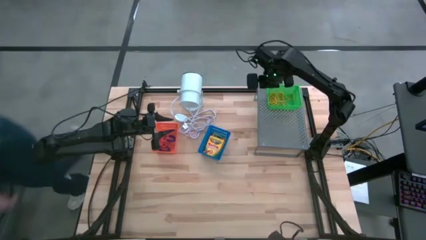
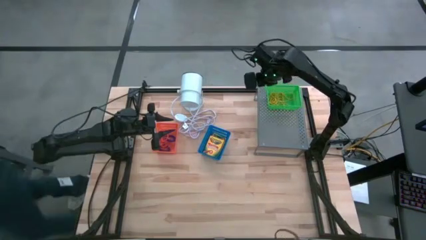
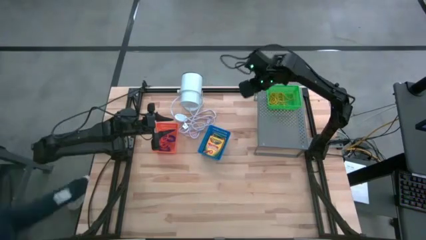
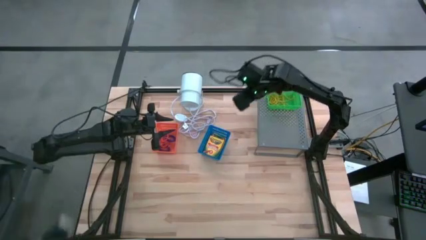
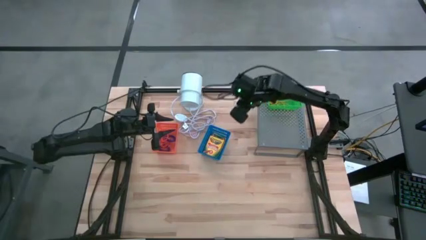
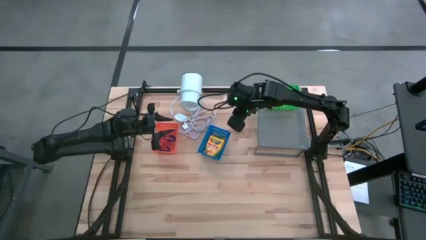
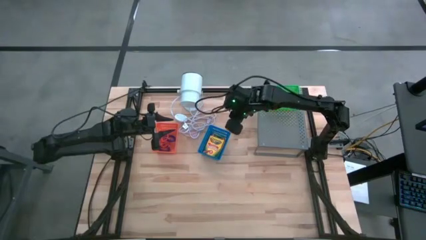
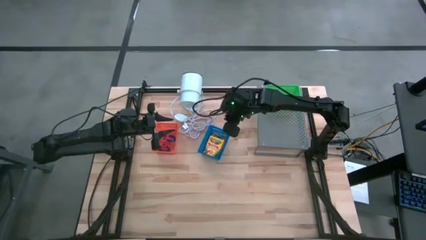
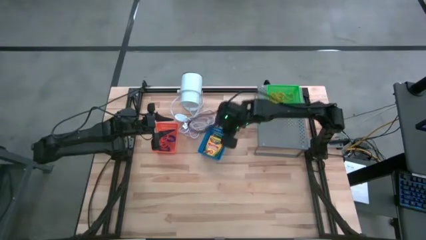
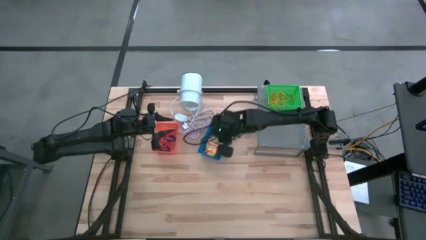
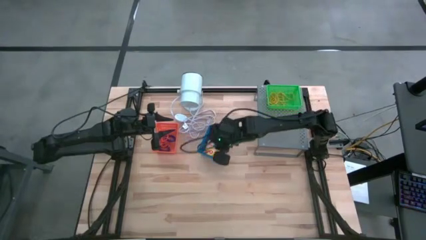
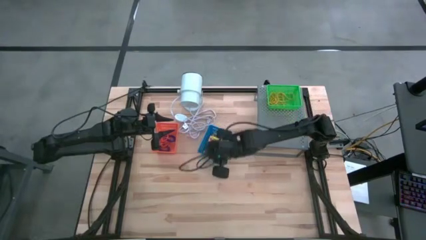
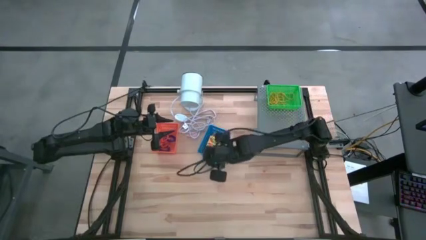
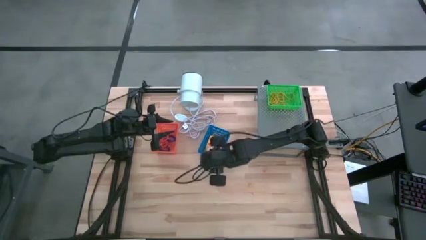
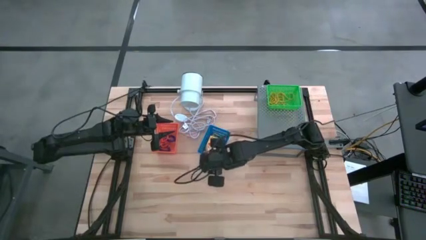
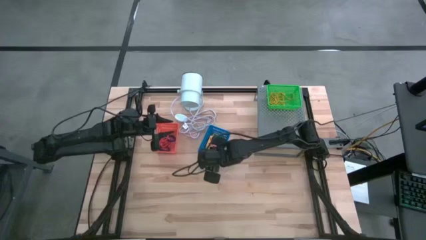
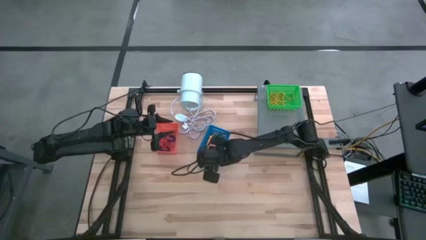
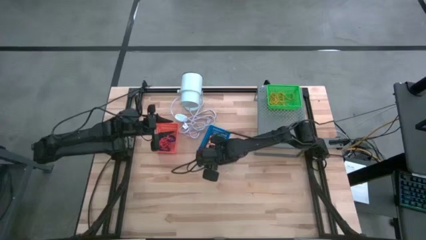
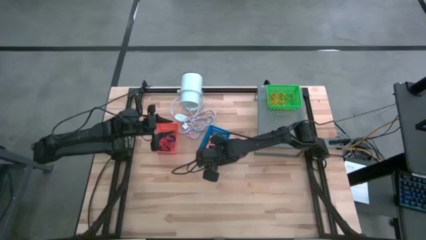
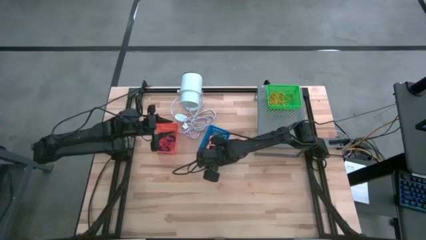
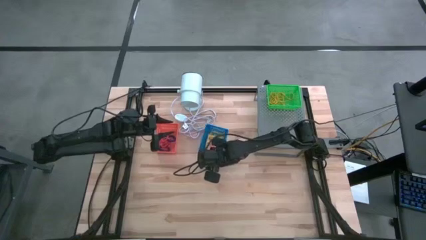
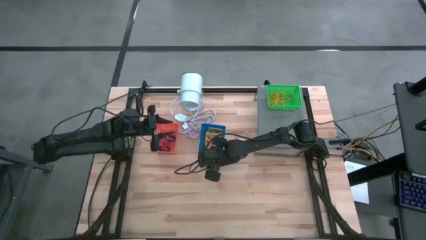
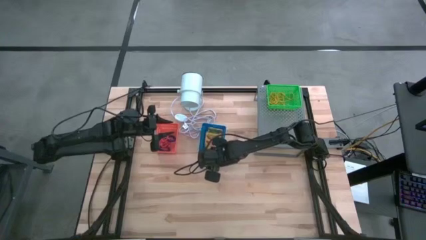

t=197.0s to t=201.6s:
Task: Pick & Place Office Desk Supplies
Put the blue bin filled with pack of crayons on the shelf

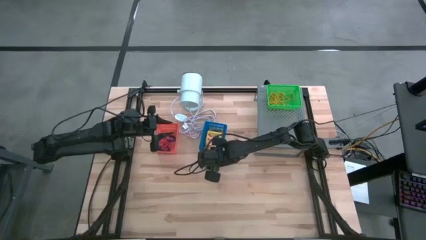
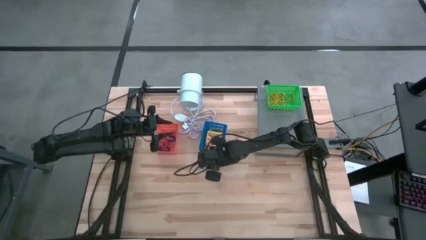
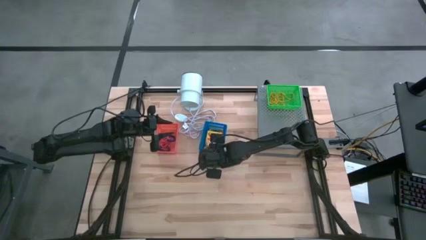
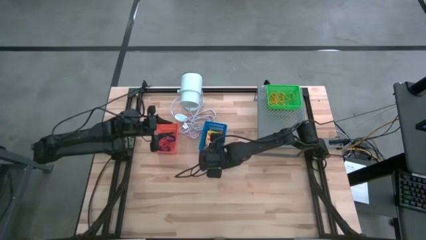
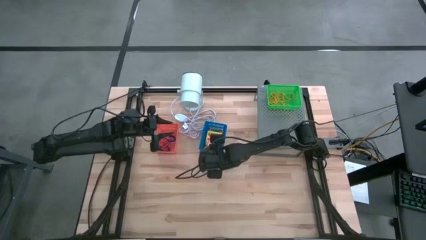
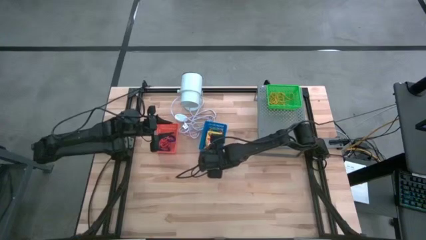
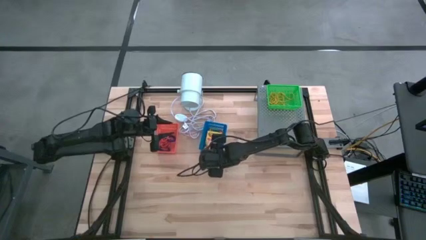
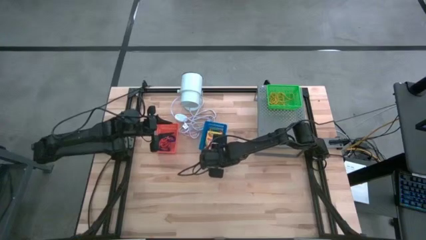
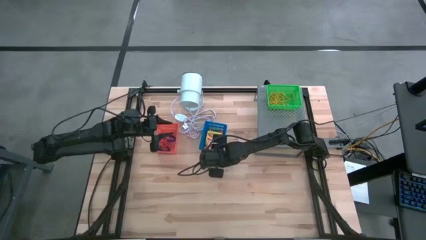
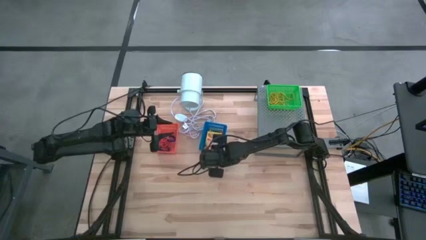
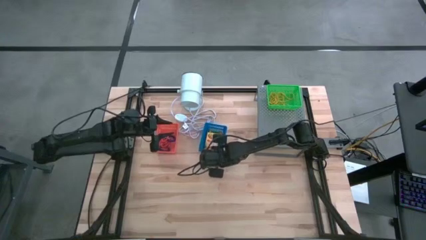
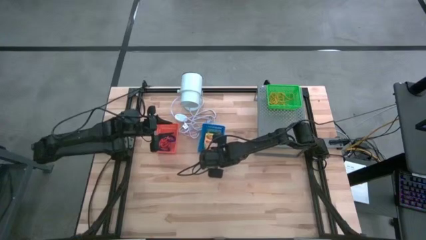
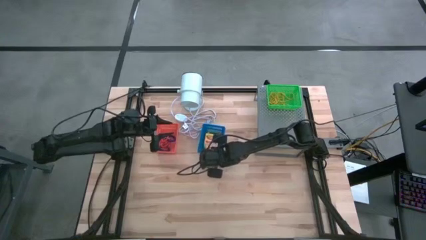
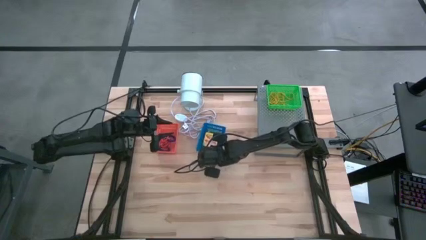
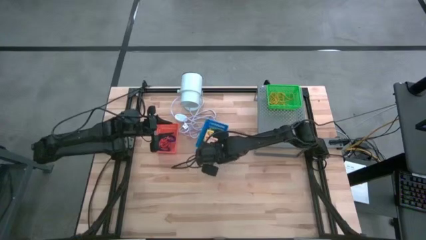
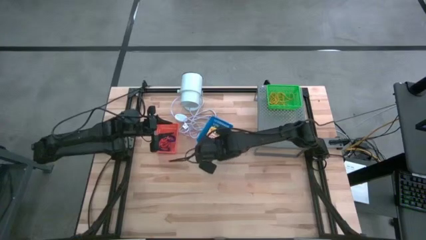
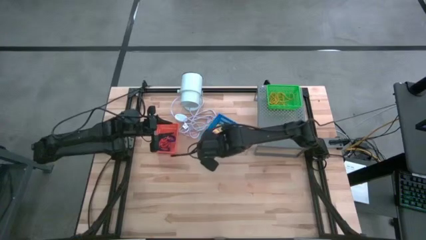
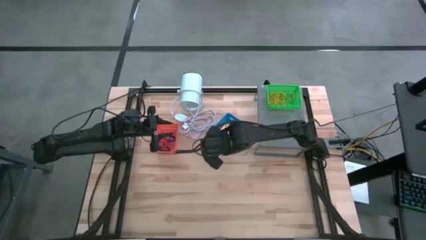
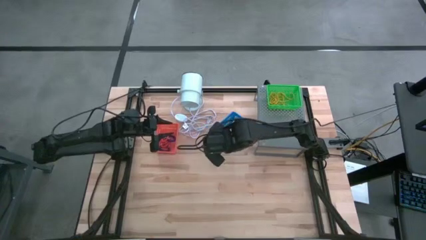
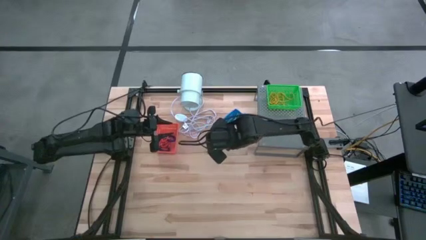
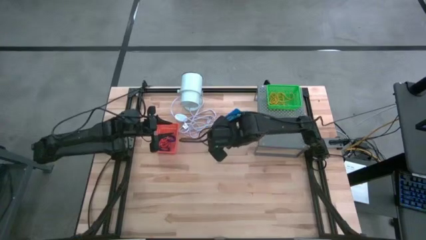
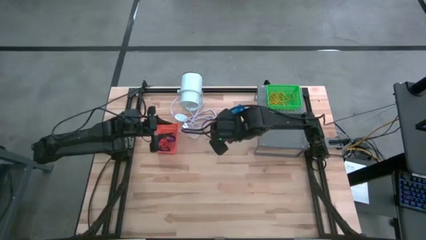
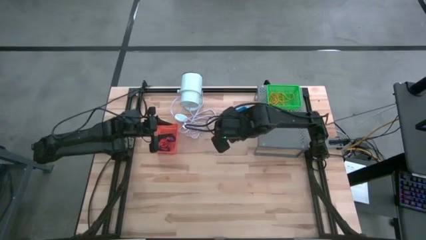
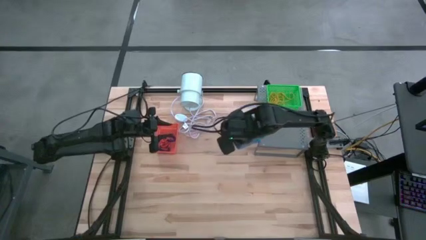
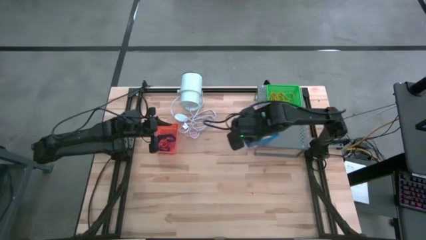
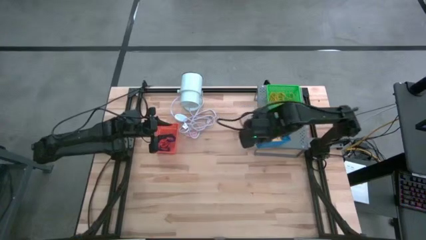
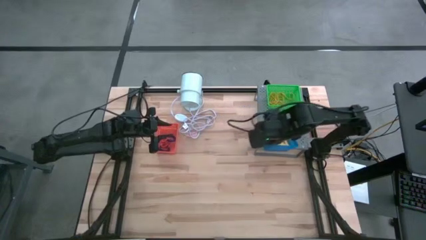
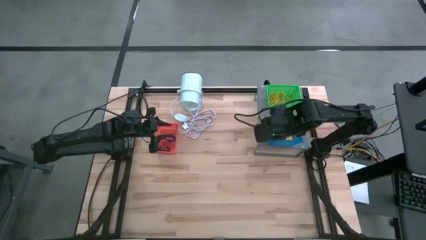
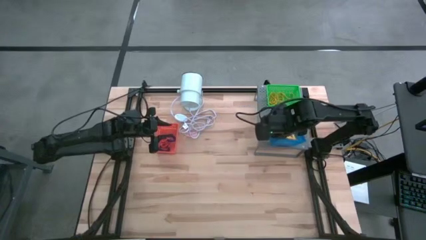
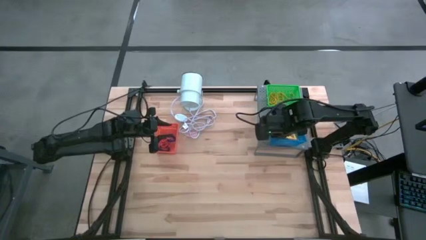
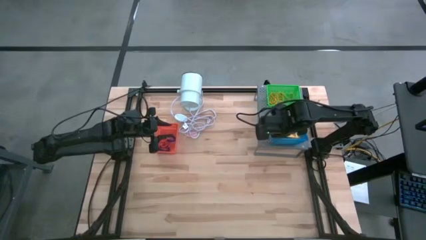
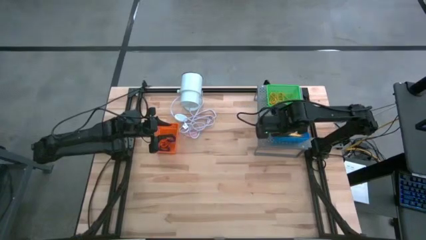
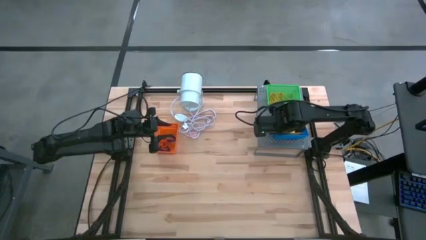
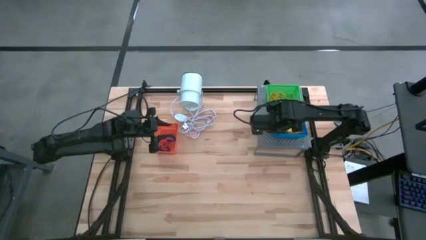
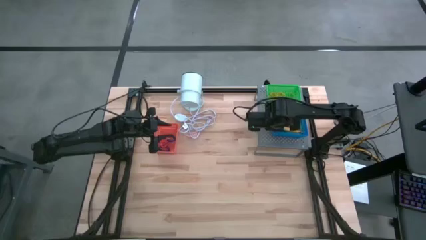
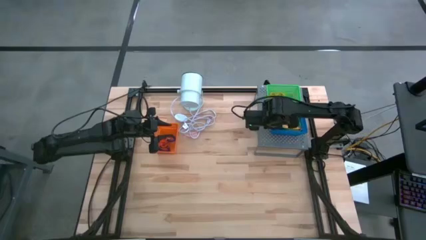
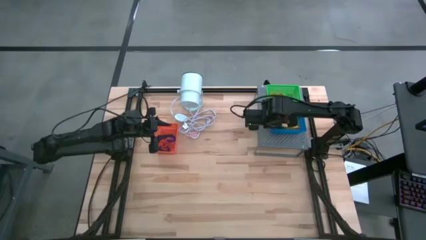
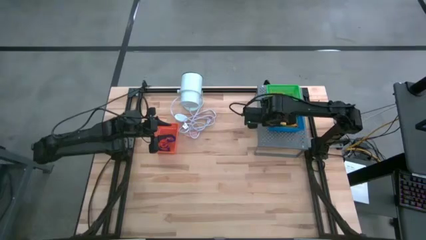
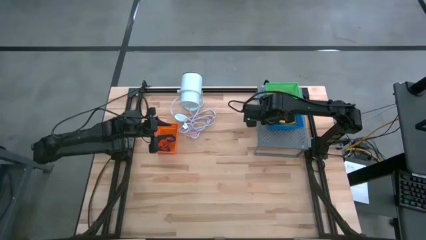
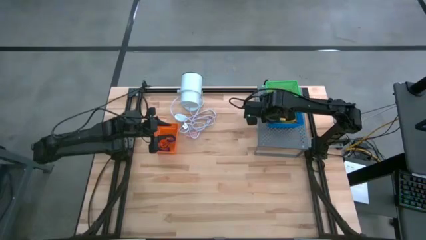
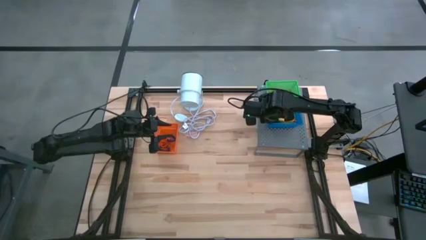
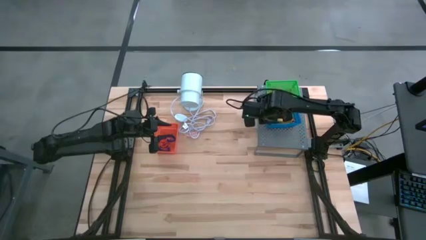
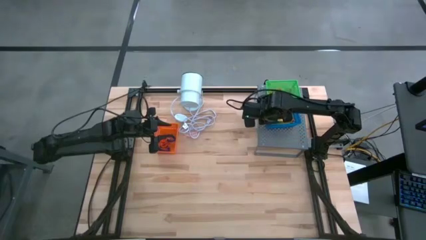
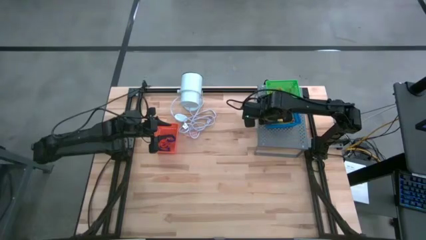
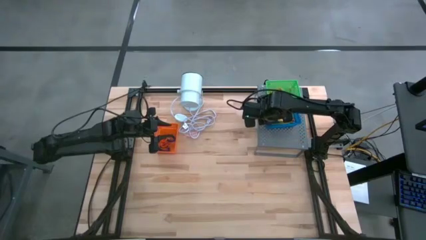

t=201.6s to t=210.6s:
Put the blue bin filled with pack of crayons on the shelf
